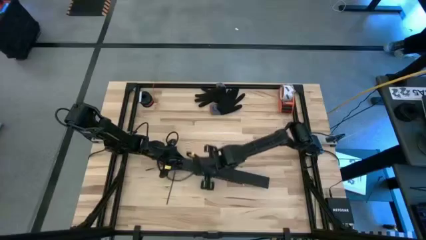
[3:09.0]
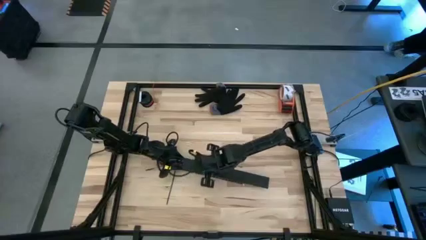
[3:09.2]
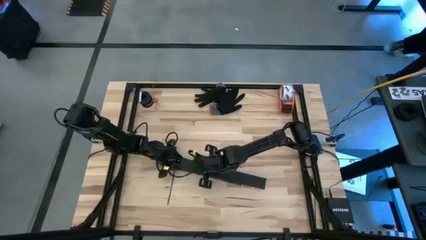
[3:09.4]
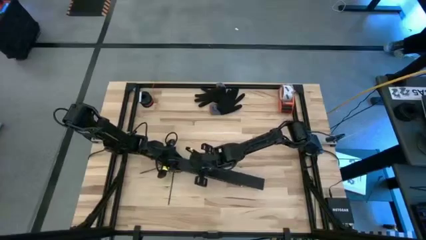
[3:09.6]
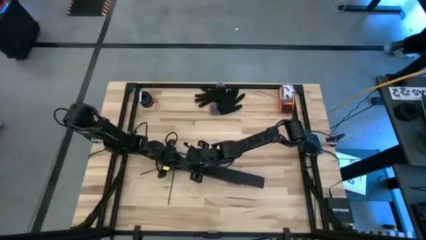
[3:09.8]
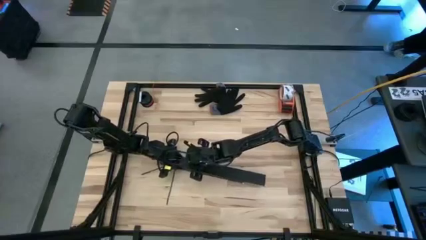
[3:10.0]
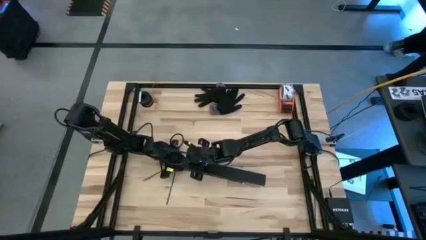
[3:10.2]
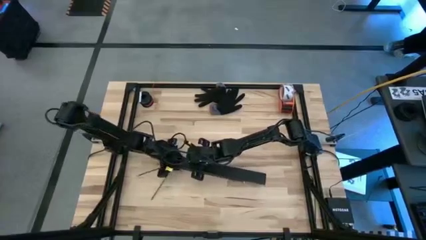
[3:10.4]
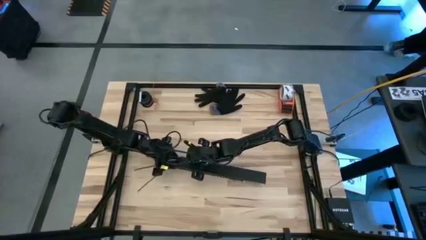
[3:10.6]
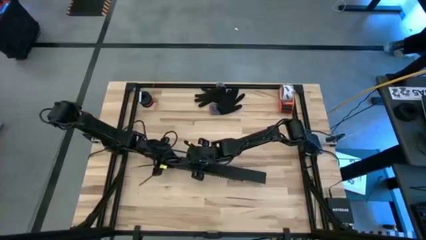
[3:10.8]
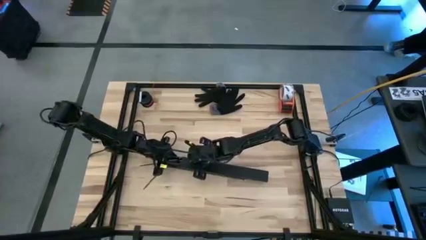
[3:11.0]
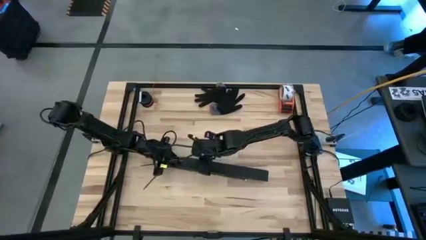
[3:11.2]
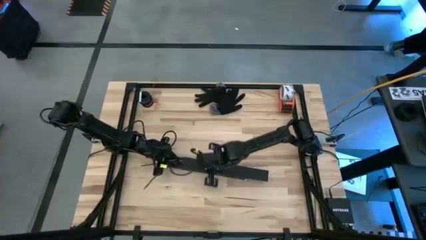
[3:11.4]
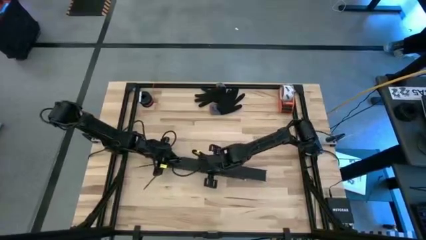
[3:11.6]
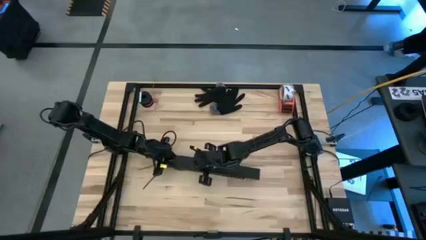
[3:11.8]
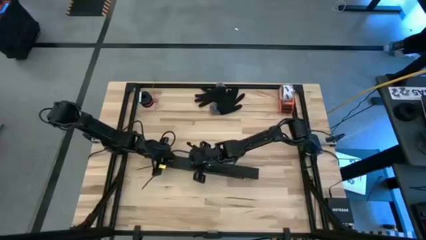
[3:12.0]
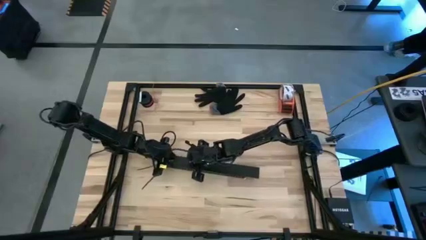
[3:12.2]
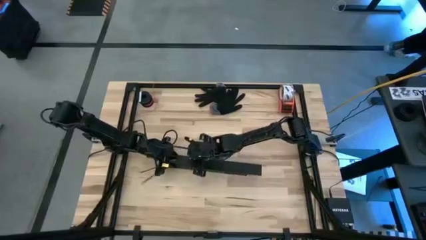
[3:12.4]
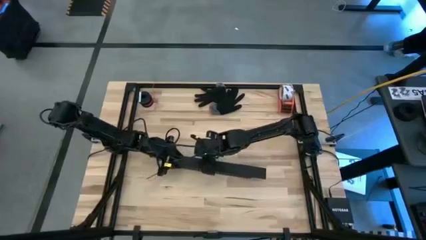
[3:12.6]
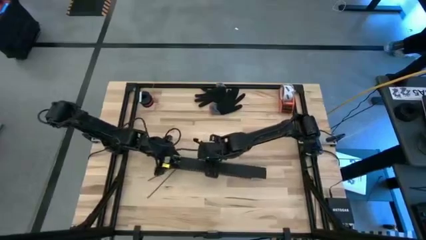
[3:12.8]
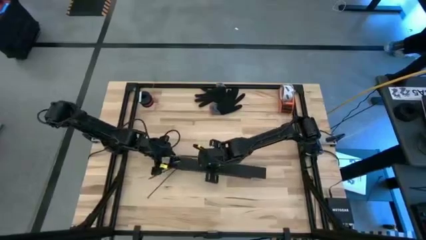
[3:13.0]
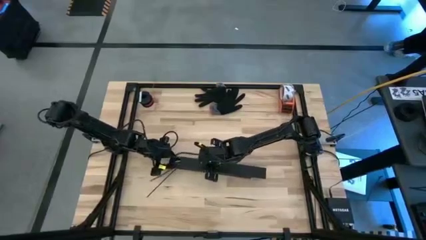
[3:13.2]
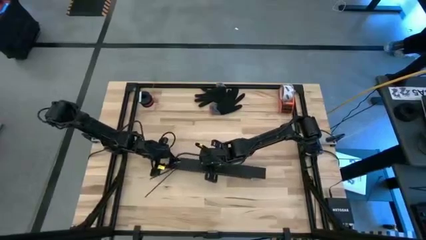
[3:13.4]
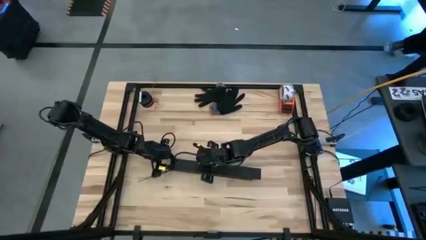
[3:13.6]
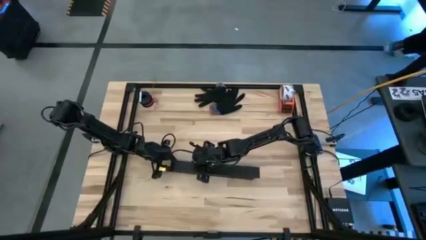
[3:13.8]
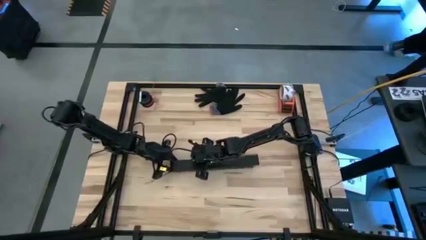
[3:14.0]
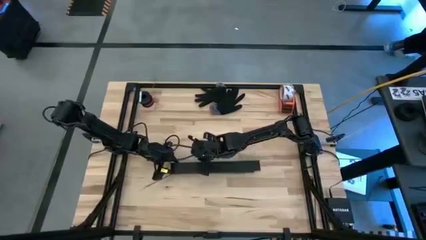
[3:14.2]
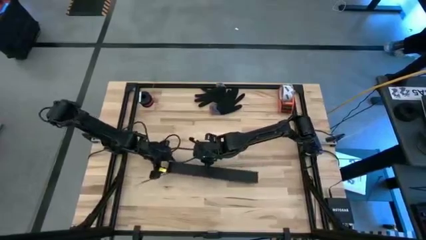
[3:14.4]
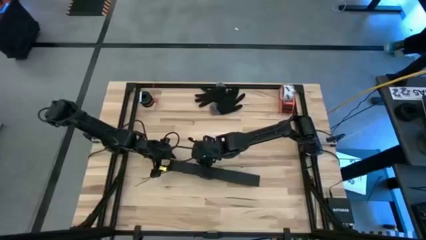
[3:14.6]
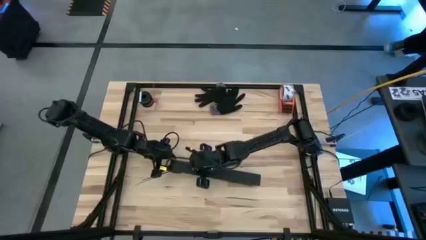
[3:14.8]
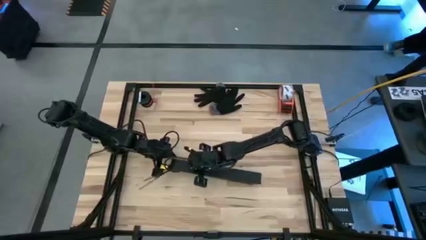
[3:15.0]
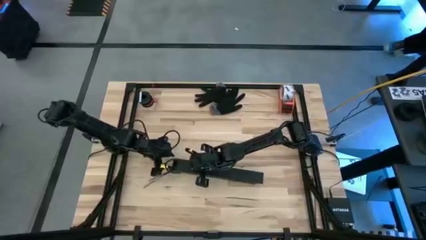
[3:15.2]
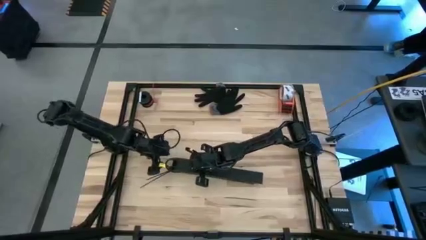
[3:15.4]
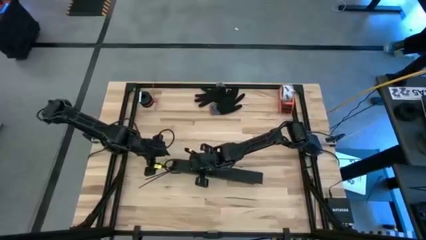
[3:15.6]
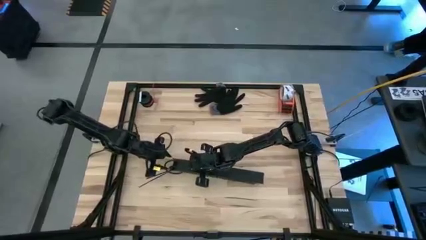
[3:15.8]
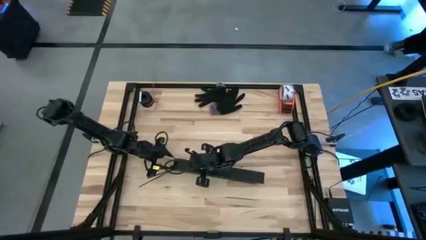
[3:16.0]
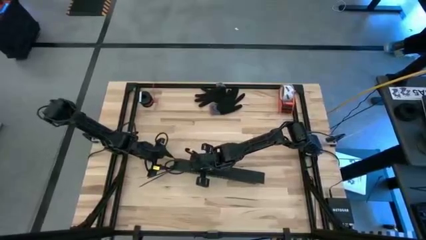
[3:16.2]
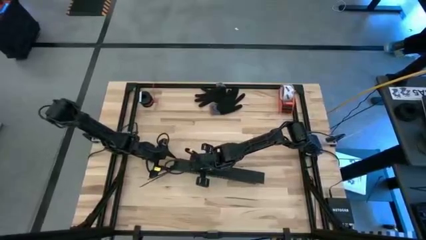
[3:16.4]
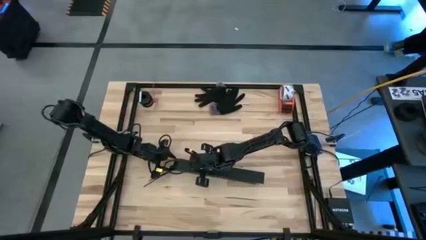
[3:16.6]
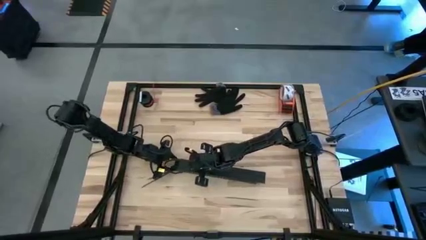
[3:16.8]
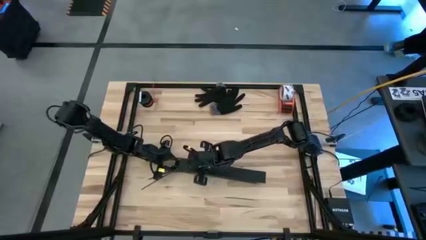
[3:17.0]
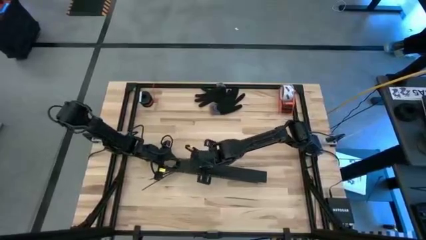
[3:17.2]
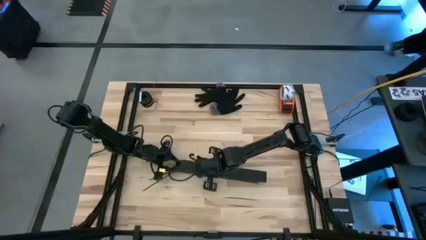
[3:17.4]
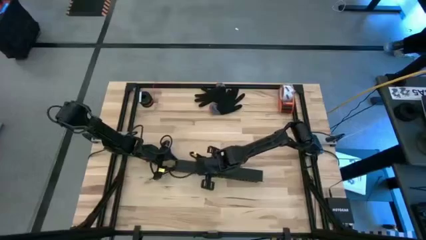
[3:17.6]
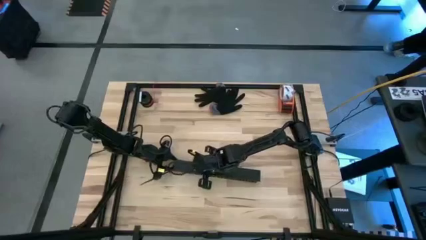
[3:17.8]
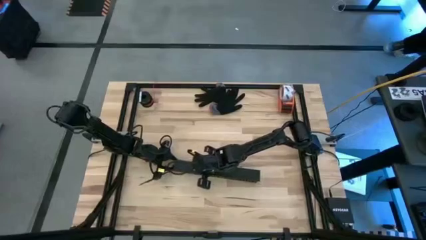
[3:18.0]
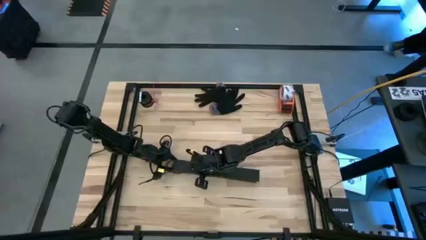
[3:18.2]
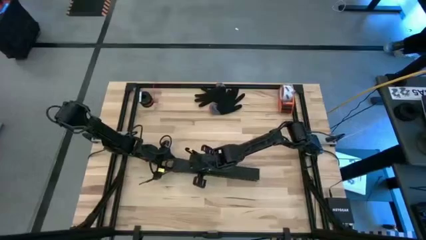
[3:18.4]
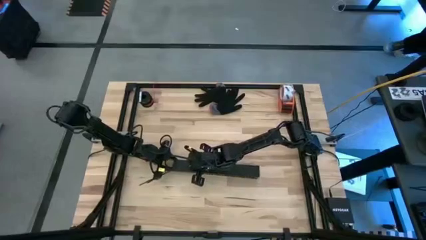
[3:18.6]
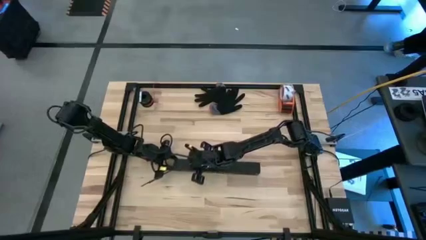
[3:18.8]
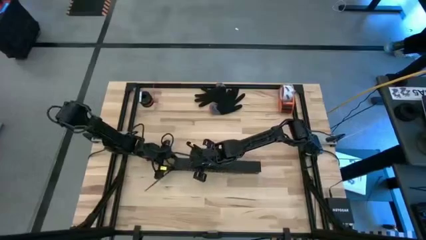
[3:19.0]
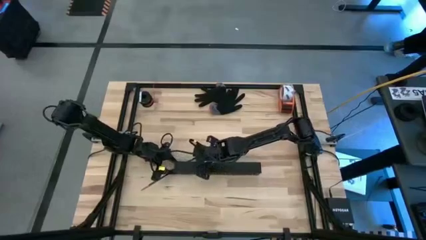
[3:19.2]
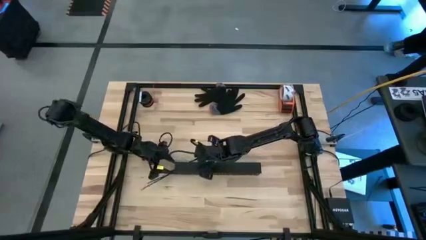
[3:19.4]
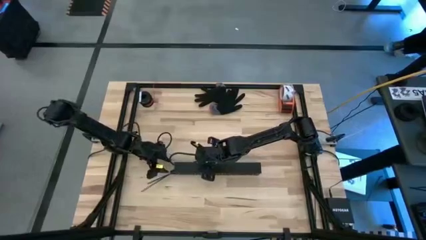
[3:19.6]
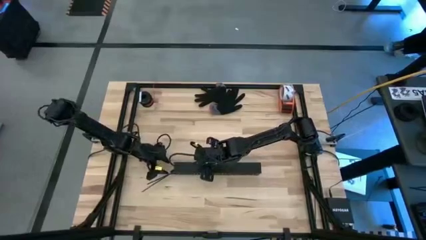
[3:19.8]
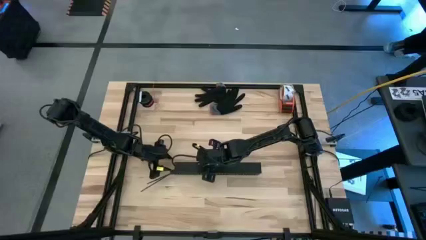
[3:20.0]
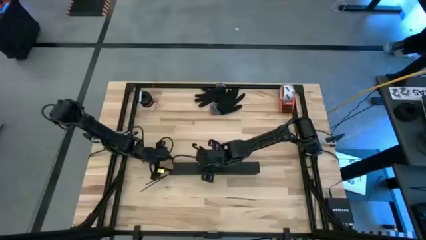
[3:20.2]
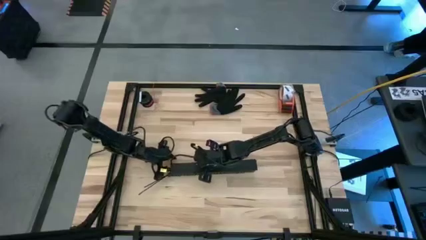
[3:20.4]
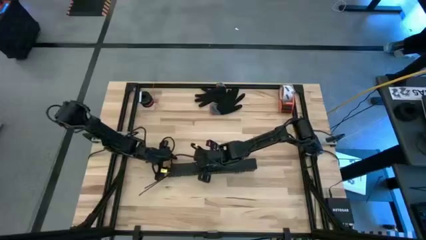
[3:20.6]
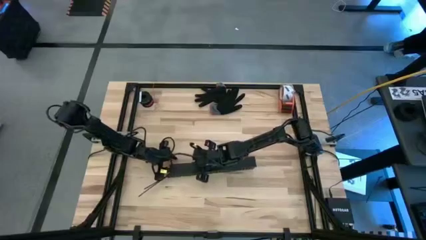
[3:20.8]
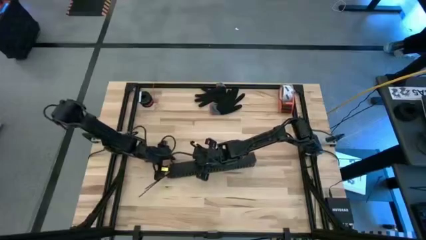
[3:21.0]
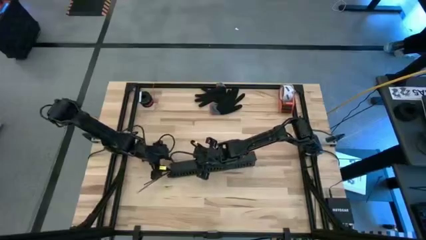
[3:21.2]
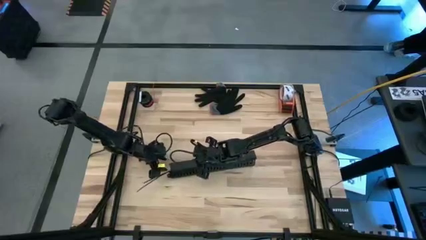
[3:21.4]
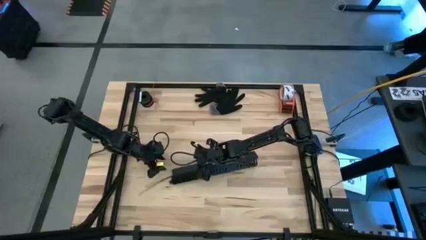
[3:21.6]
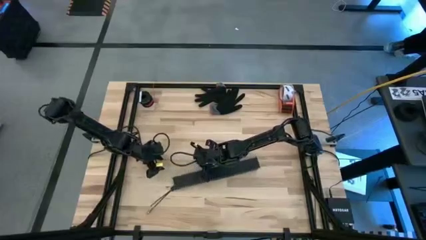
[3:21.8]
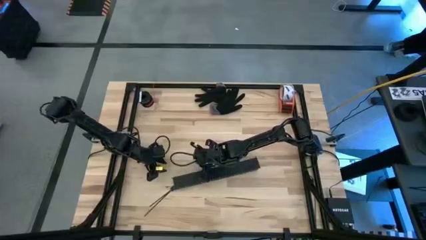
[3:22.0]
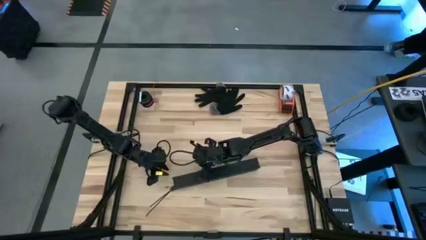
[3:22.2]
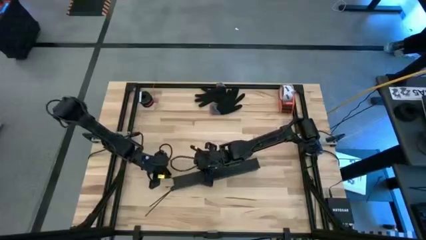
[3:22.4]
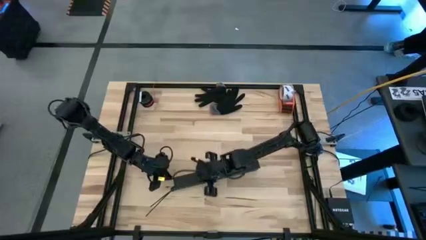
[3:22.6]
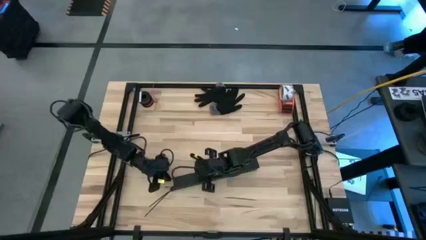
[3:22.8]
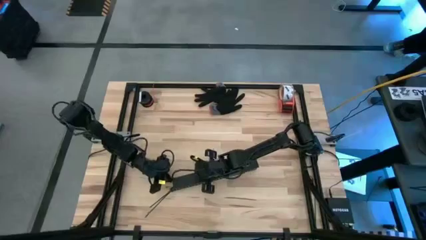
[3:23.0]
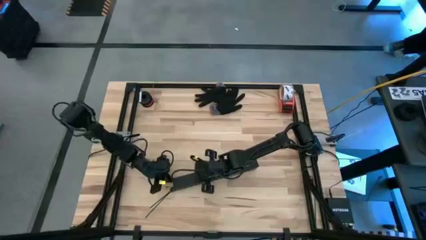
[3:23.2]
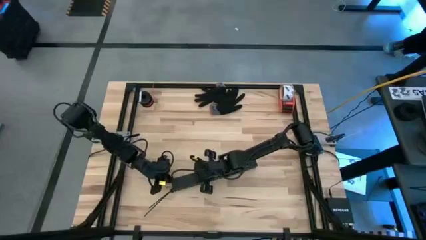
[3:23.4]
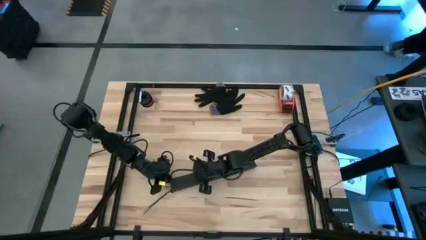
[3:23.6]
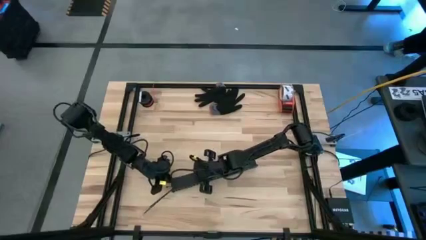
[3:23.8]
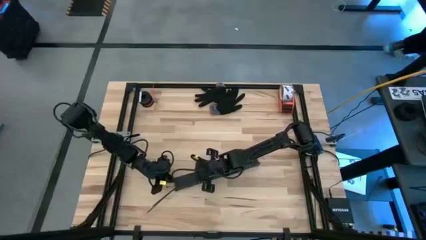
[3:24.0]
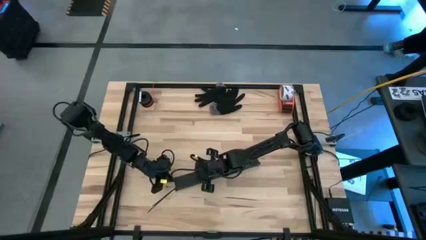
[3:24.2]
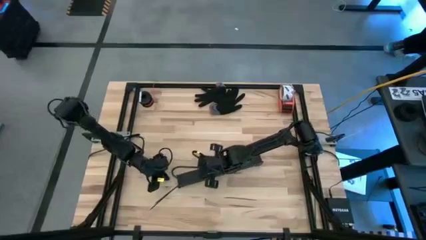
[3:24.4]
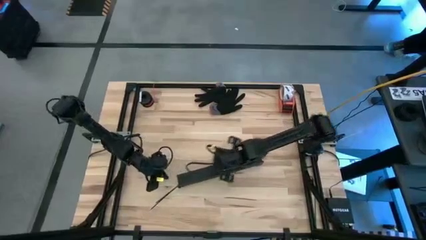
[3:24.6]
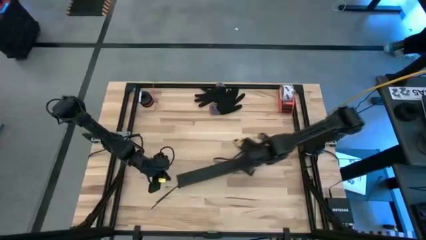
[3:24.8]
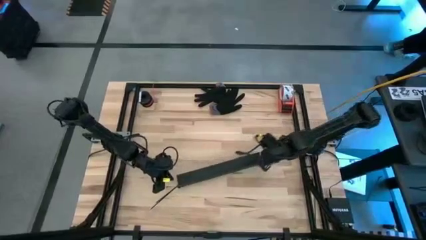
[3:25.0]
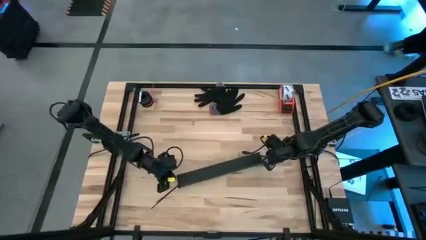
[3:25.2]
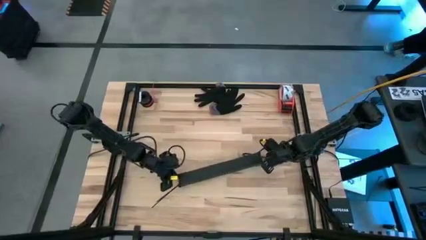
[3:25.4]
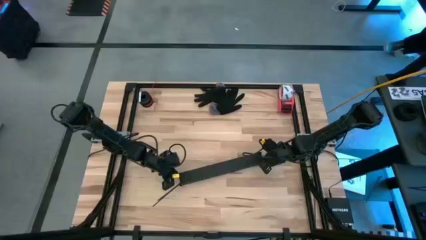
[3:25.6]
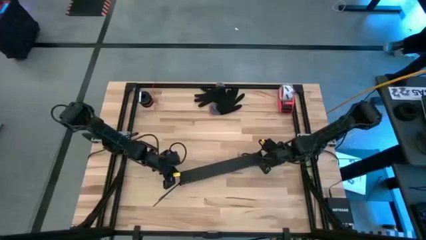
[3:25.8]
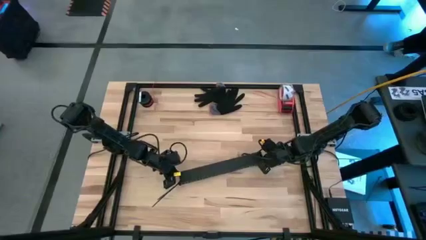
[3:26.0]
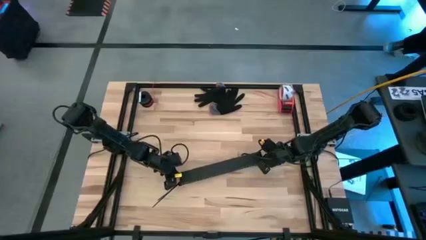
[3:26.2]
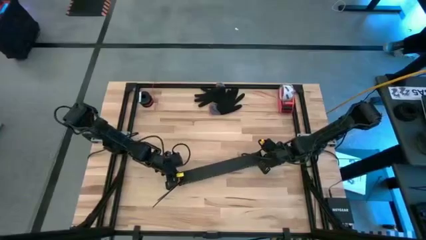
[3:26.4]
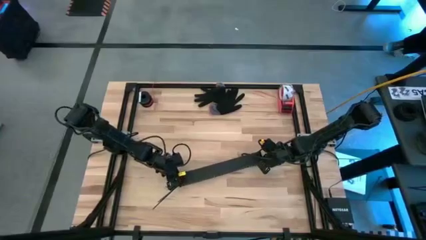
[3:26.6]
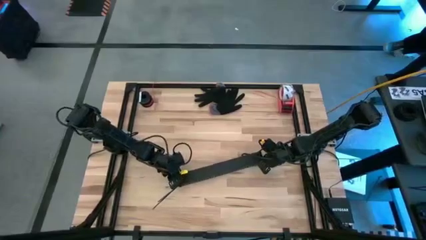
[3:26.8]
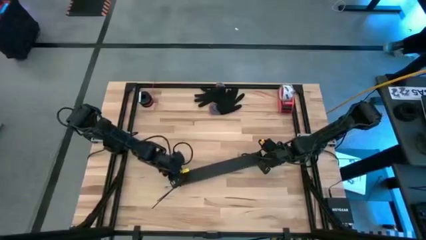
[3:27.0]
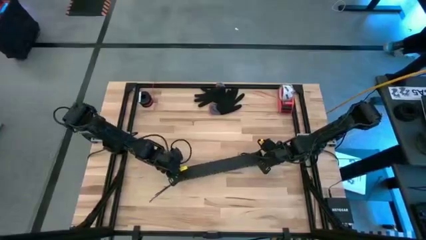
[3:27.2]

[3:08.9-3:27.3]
Task: Ziptie cables
Close the cable duct
